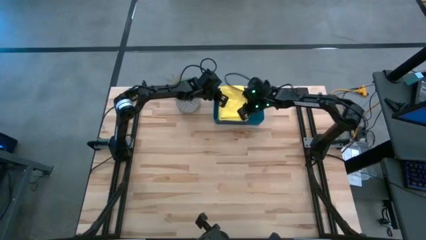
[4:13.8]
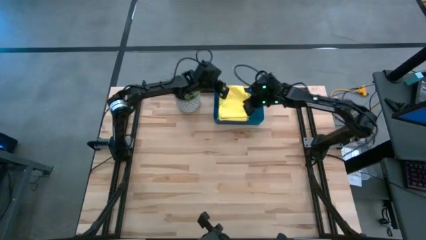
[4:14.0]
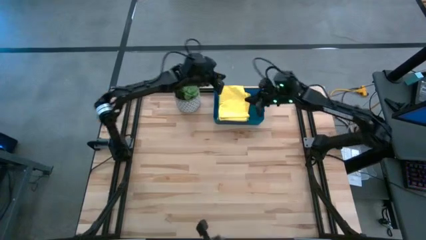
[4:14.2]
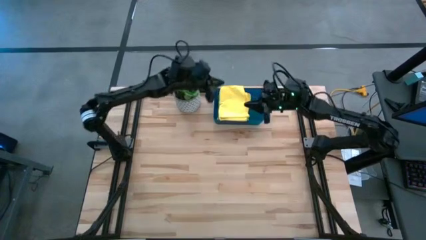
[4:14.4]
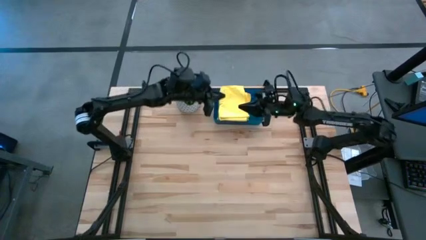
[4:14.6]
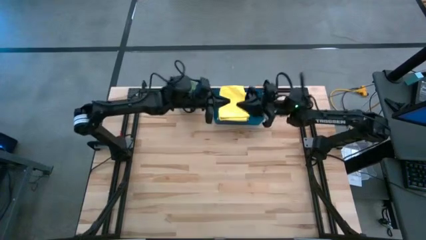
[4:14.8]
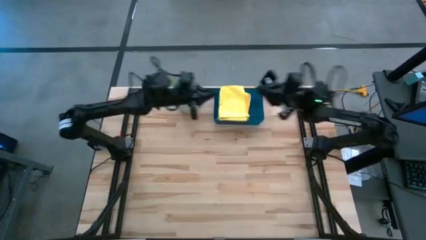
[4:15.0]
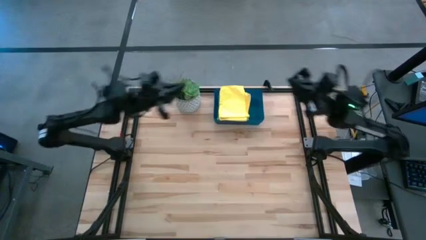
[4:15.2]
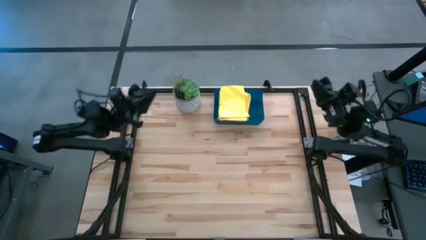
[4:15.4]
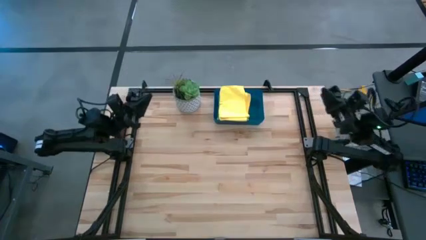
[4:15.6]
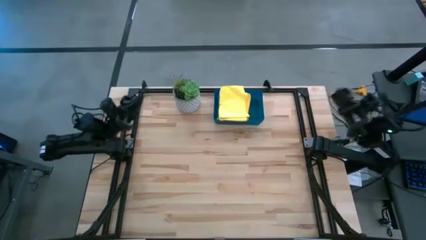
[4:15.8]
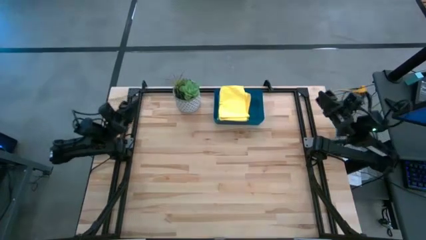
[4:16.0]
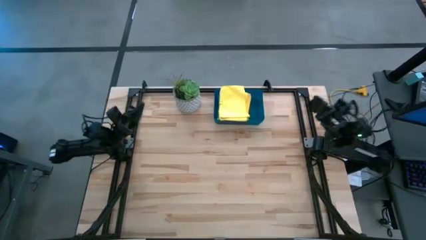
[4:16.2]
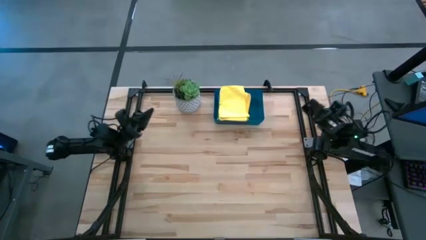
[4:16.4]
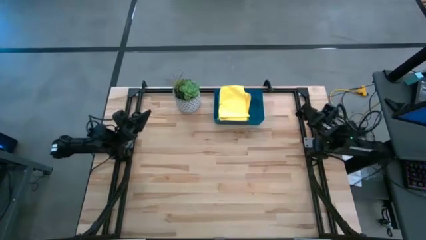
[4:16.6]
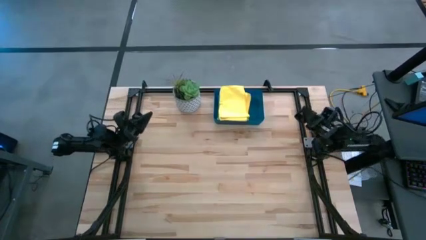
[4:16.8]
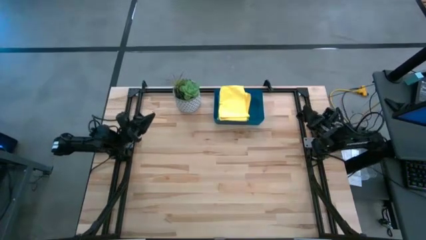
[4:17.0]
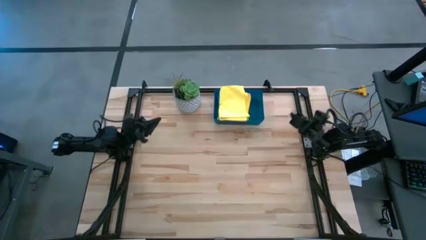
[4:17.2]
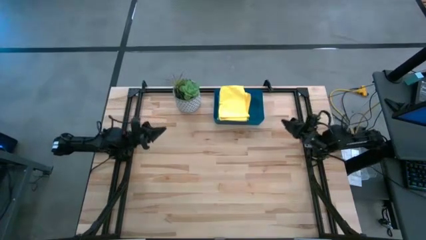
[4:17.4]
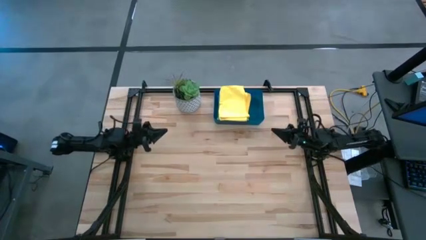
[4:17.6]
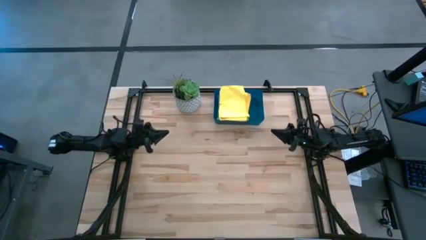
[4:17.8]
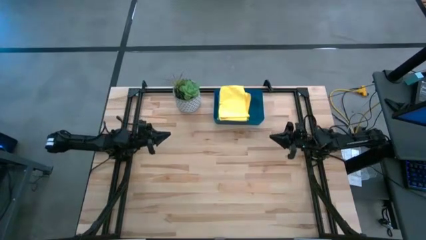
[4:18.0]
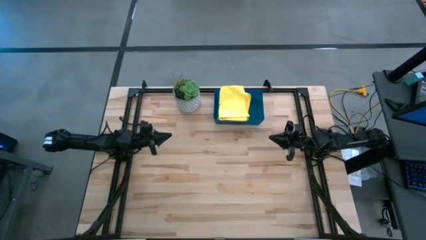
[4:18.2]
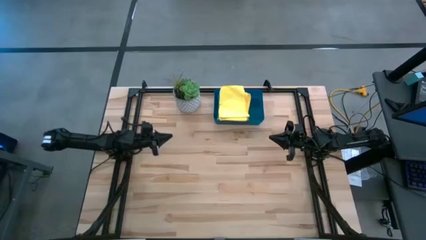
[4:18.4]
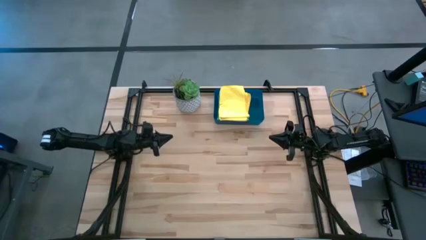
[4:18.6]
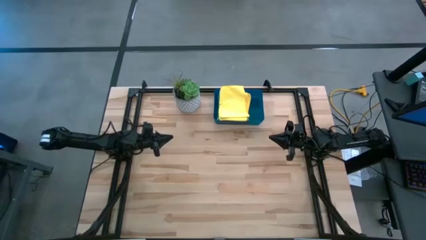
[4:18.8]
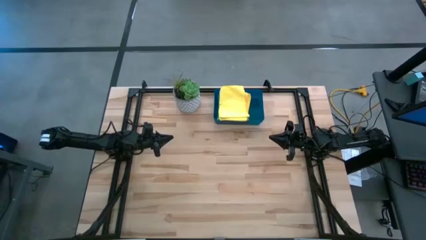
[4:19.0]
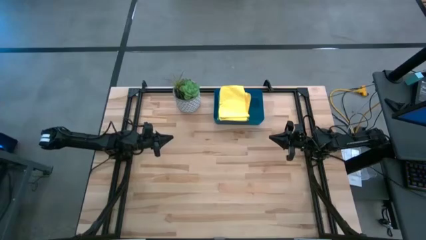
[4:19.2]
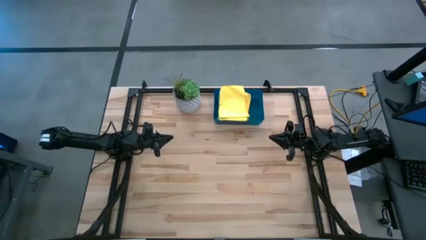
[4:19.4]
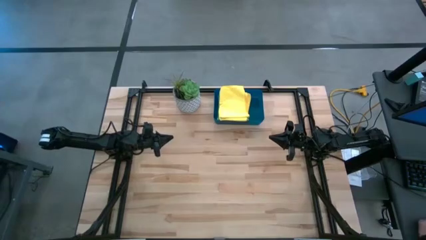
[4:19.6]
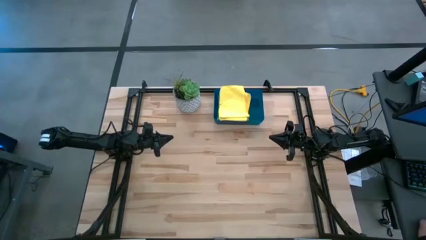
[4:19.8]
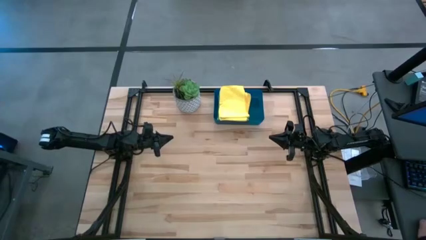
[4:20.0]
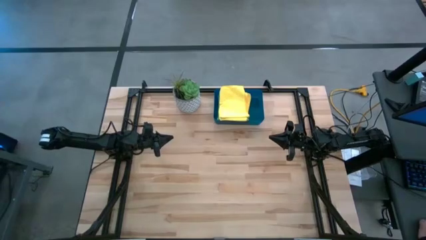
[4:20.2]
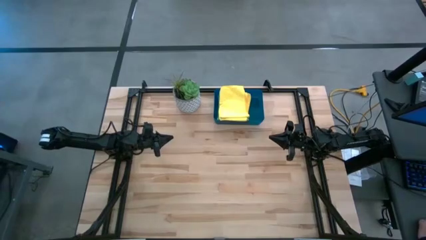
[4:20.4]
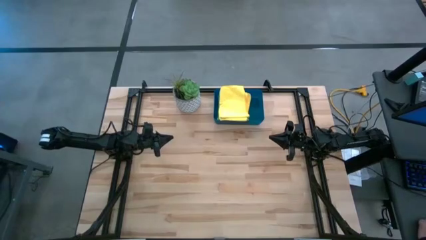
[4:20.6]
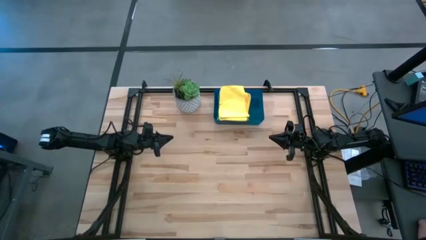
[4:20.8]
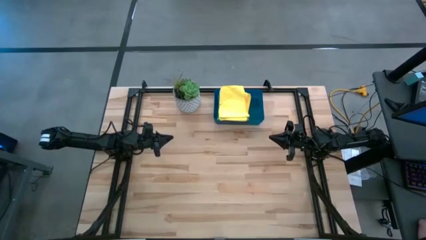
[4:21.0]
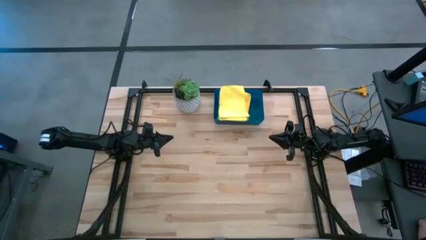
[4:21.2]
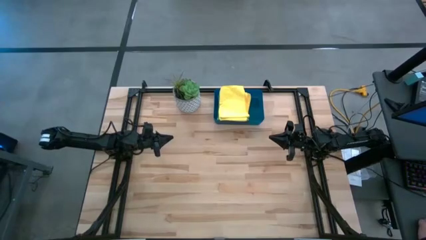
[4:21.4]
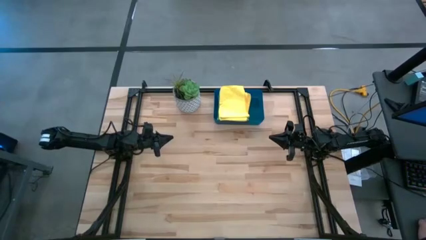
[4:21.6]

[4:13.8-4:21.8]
Task: Fold microfiber towels
Return to Home Position
